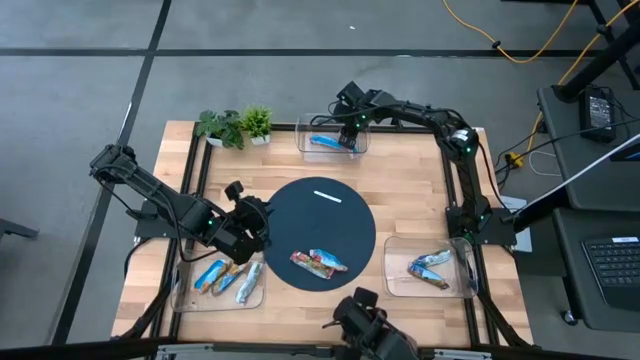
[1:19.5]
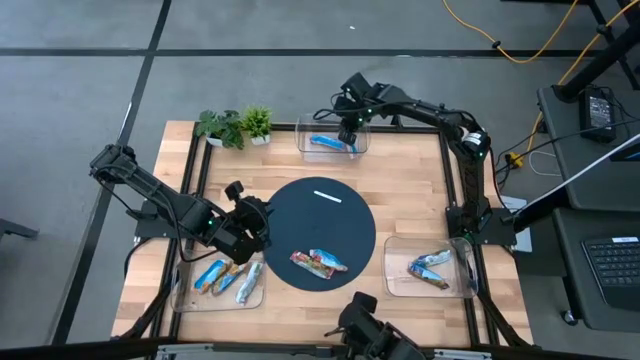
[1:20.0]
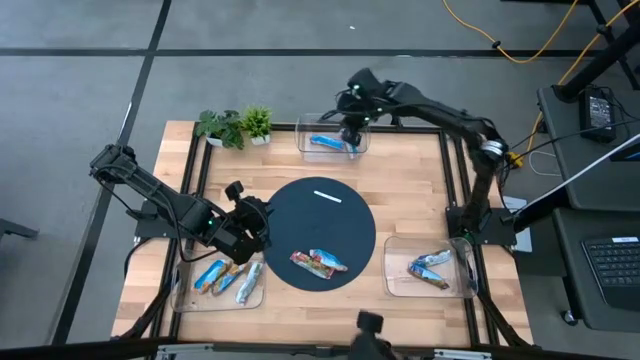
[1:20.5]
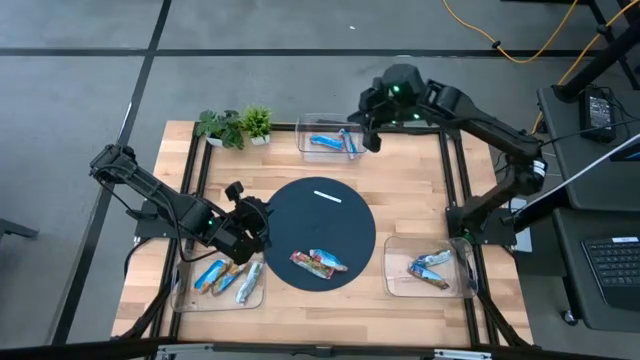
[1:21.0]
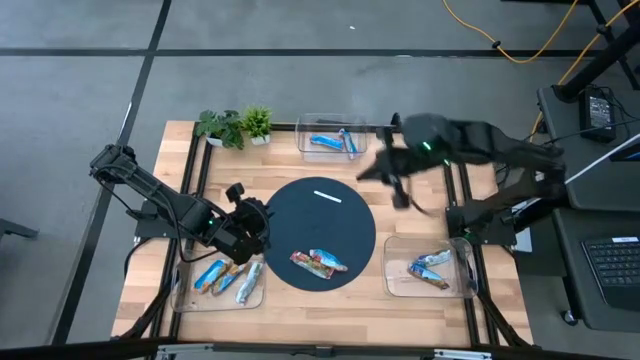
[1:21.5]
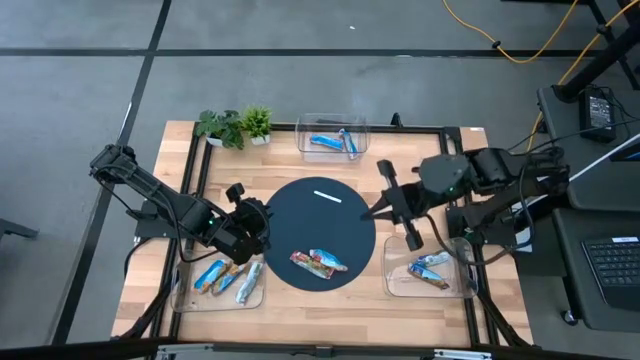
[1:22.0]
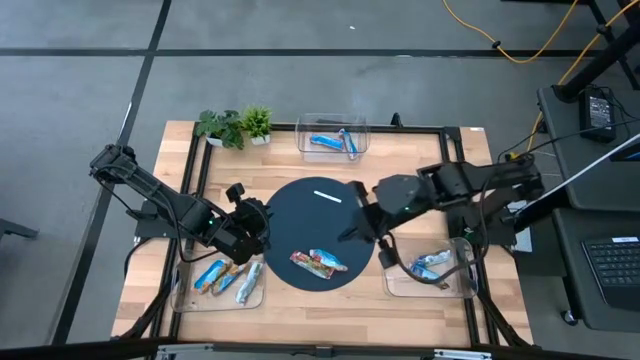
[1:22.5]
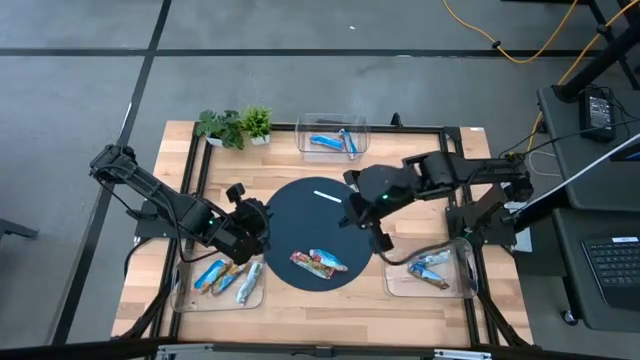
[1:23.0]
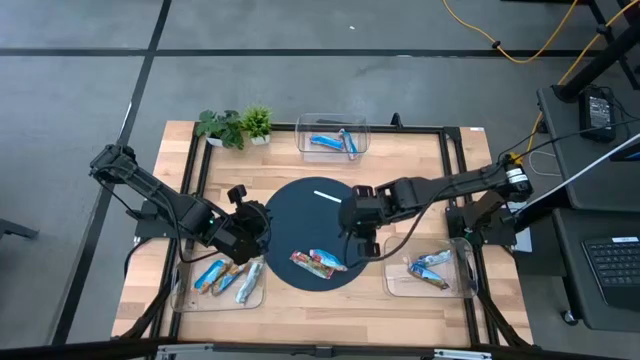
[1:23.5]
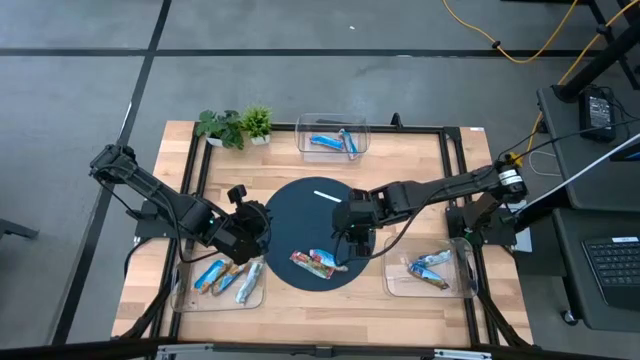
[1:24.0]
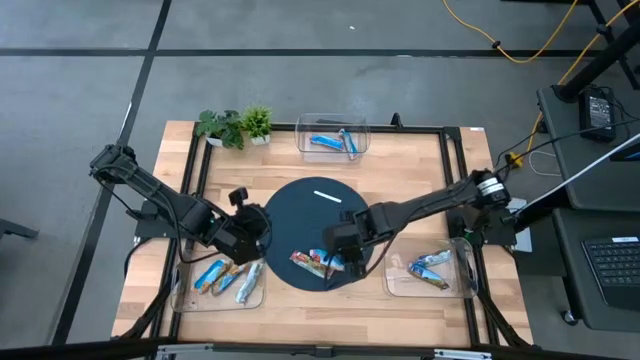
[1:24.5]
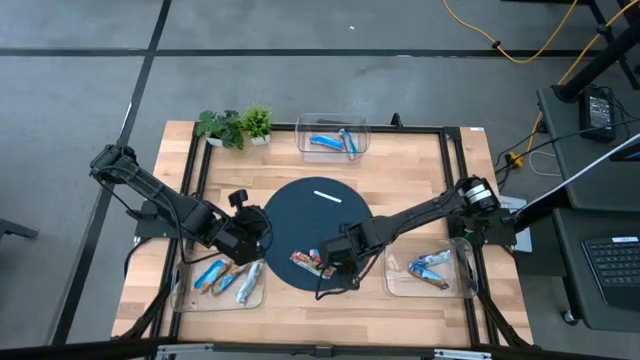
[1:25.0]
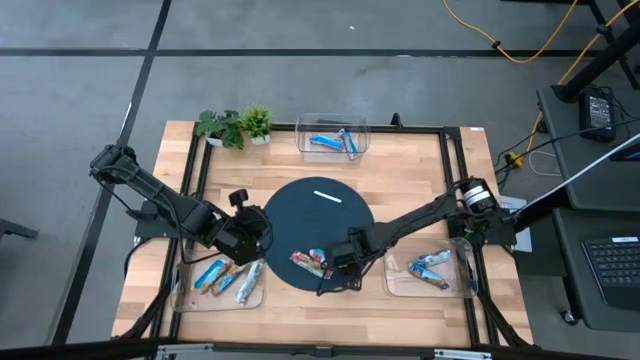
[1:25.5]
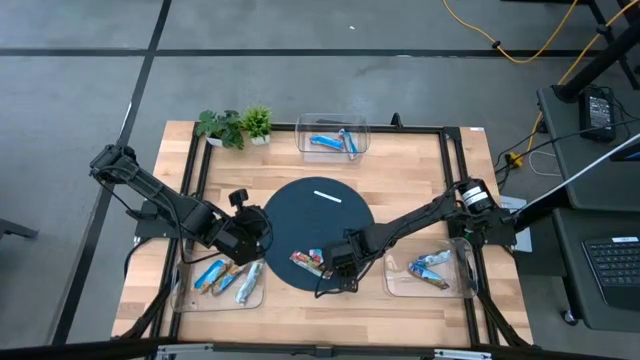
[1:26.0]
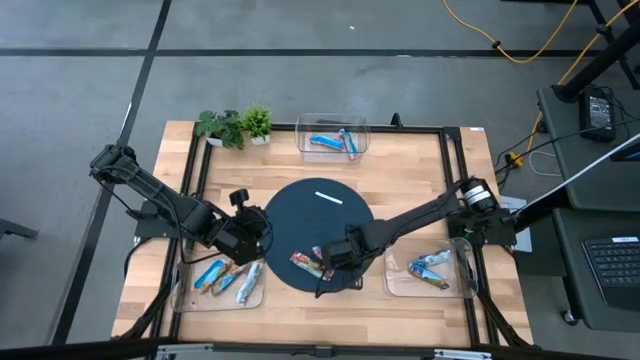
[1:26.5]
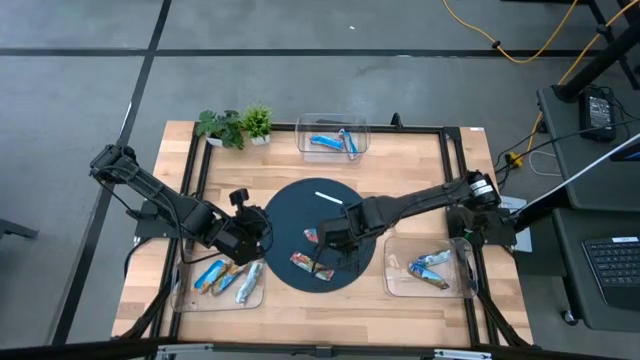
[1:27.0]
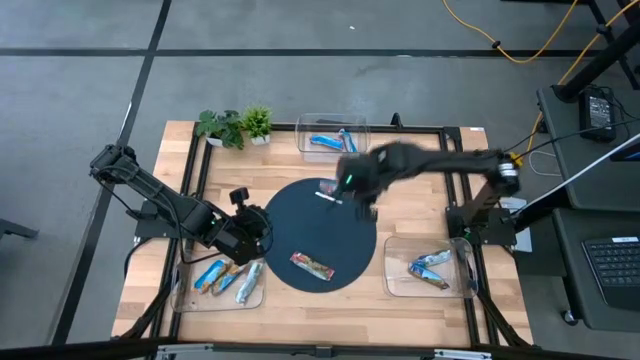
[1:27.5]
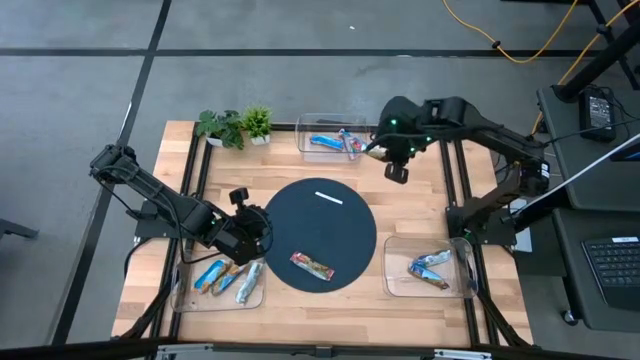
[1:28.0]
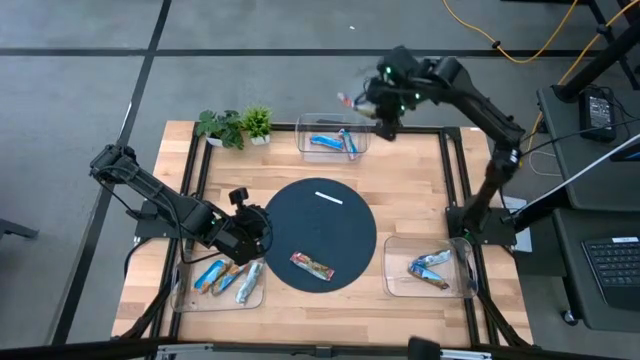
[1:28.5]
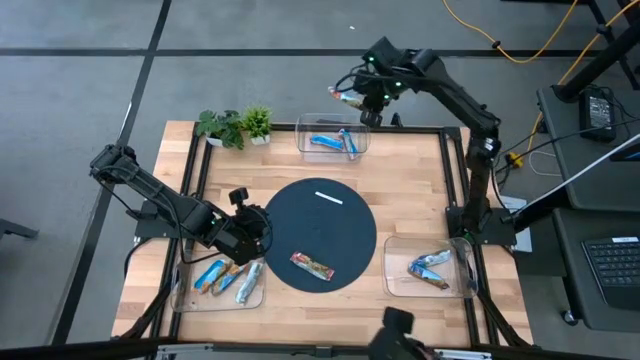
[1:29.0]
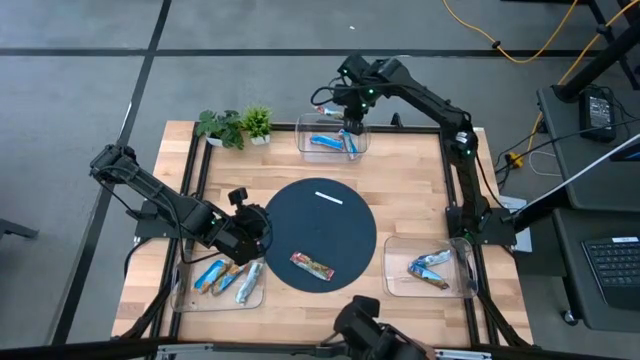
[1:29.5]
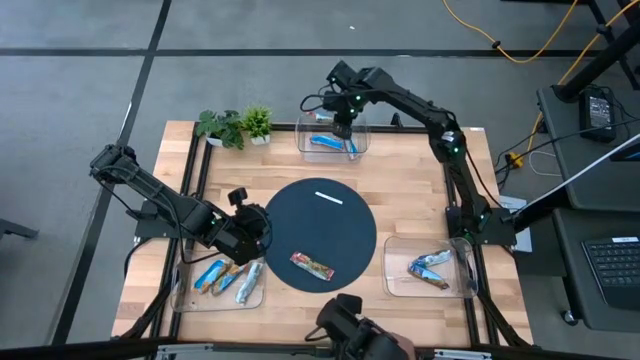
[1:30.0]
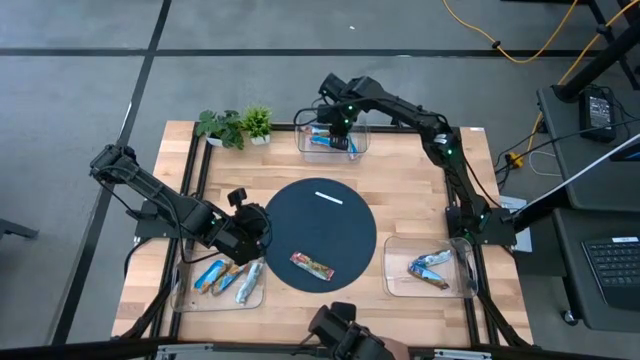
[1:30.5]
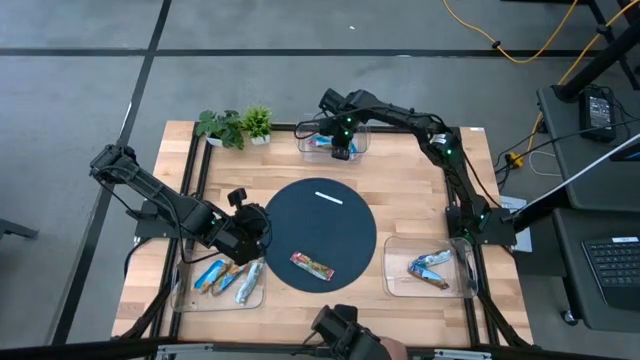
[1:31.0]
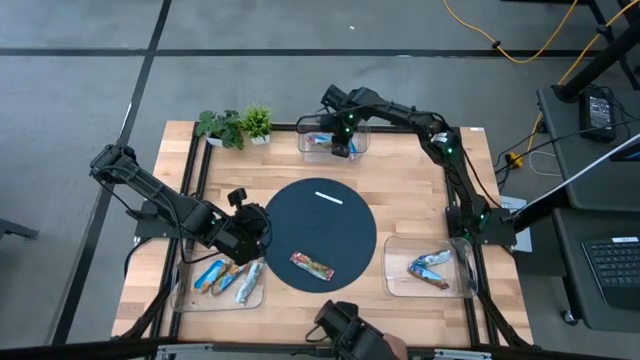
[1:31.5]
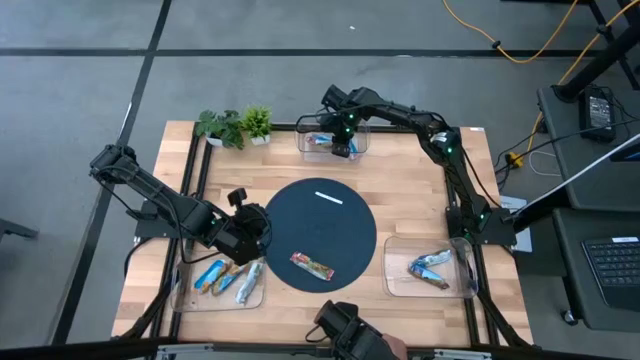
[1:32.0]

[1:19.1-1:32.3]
Task: Pick and place Granola Bars by type
Put the red granola bar into the top transparent bin

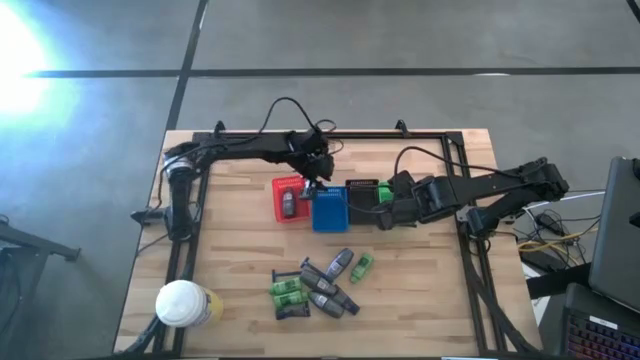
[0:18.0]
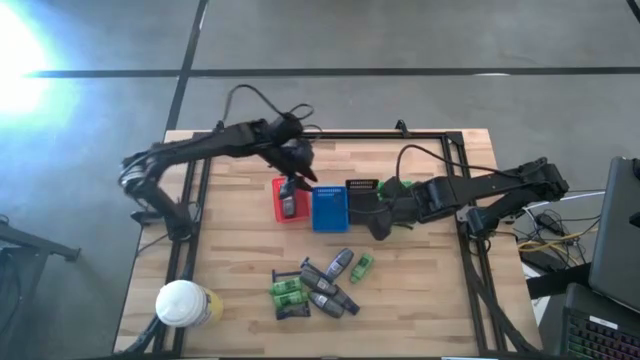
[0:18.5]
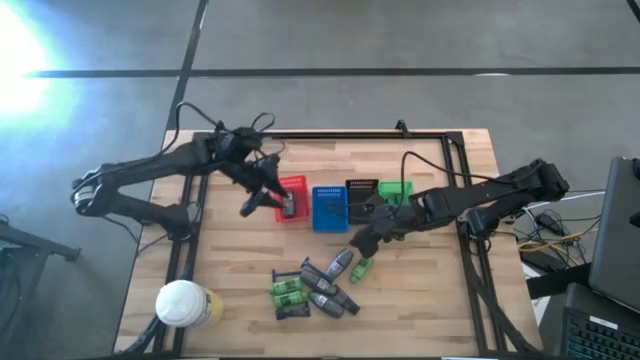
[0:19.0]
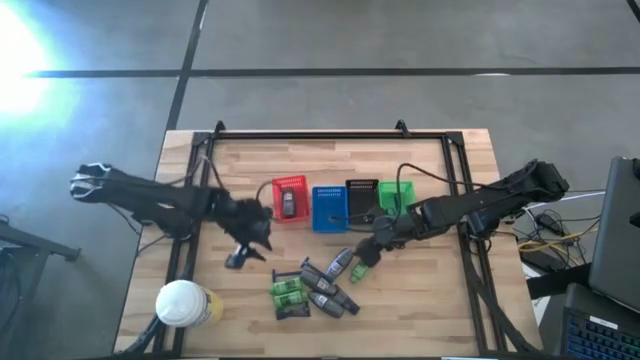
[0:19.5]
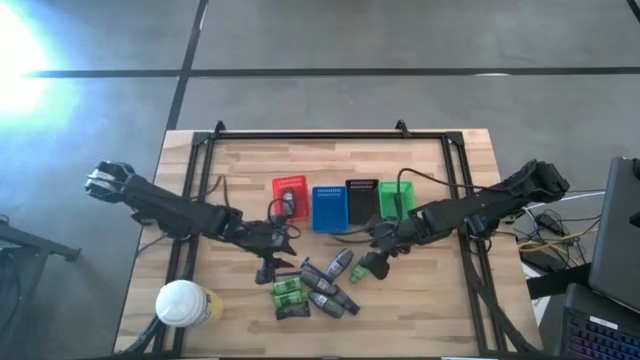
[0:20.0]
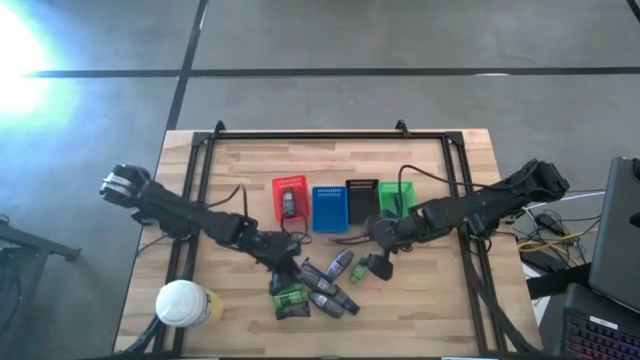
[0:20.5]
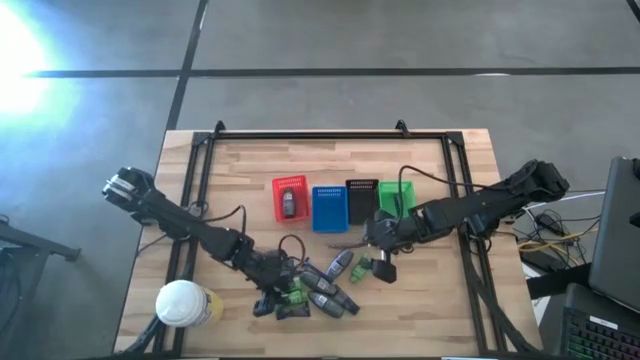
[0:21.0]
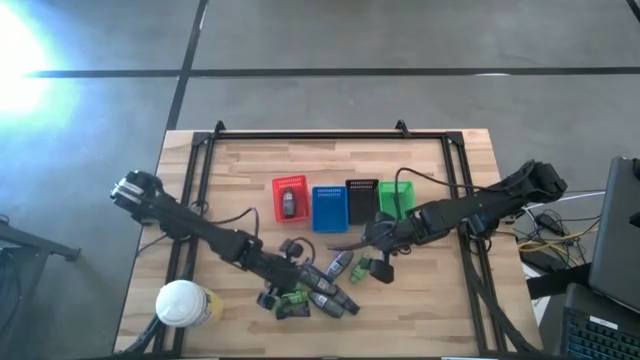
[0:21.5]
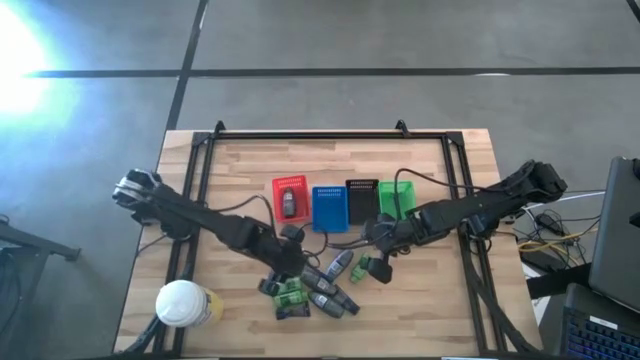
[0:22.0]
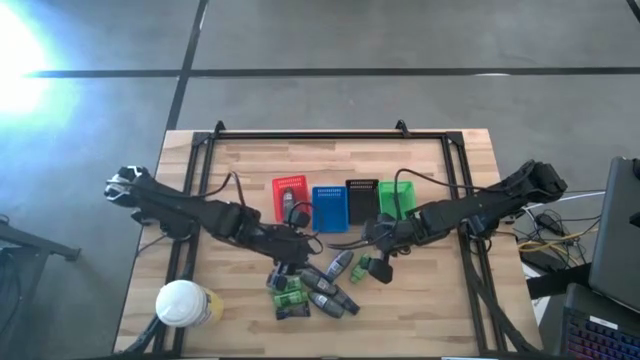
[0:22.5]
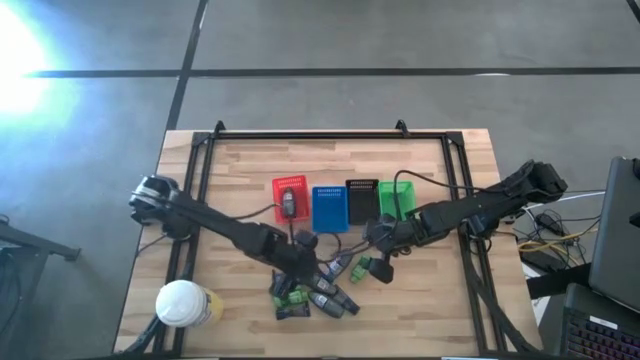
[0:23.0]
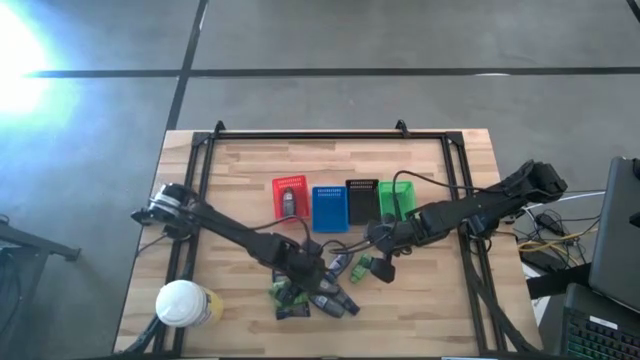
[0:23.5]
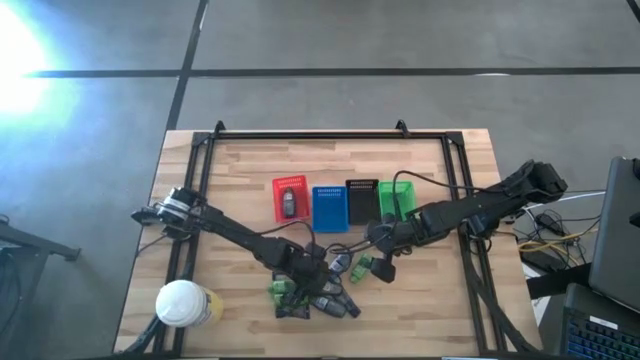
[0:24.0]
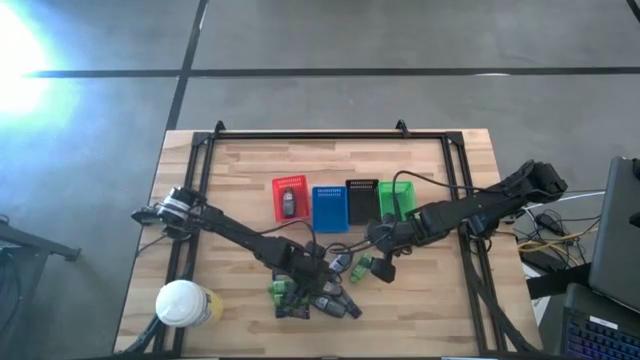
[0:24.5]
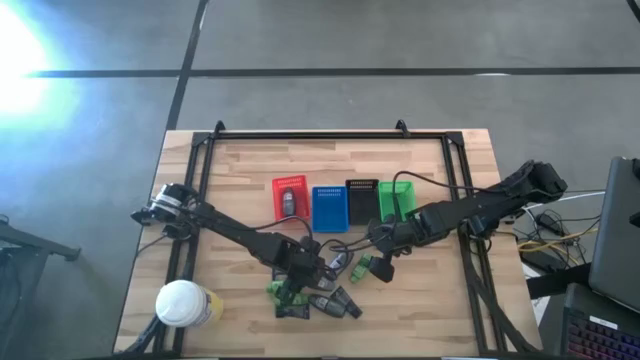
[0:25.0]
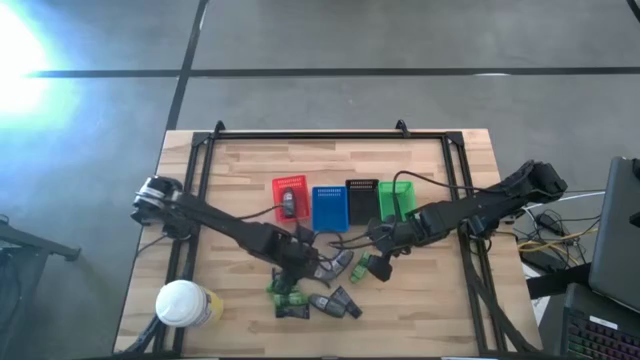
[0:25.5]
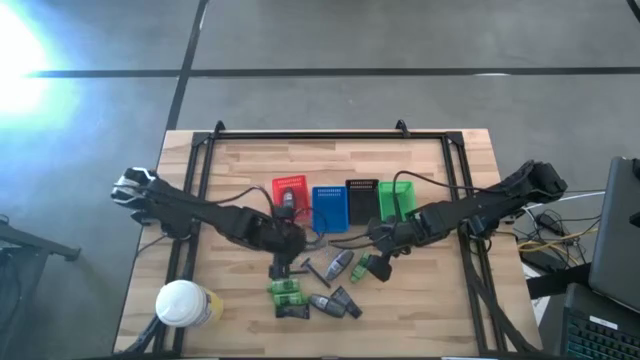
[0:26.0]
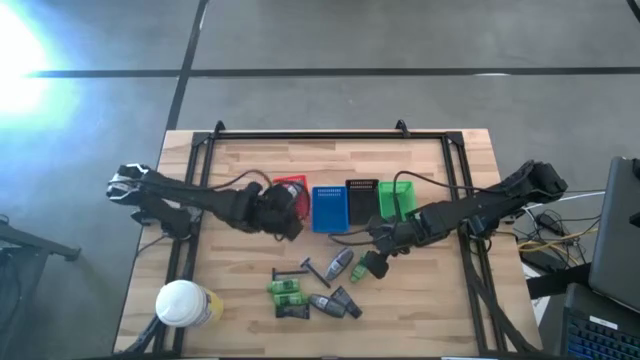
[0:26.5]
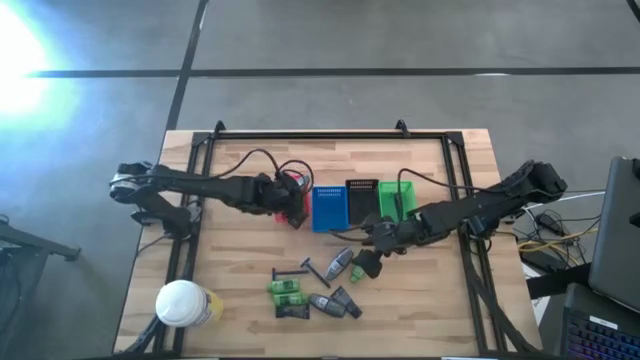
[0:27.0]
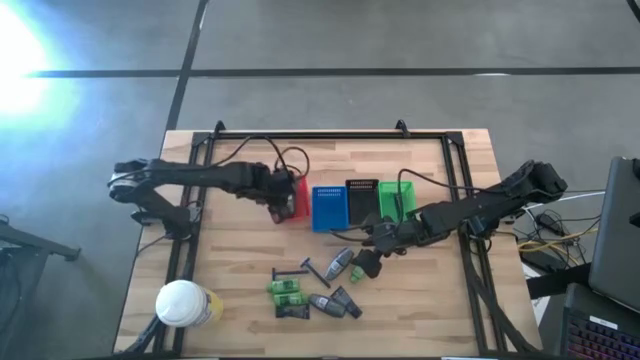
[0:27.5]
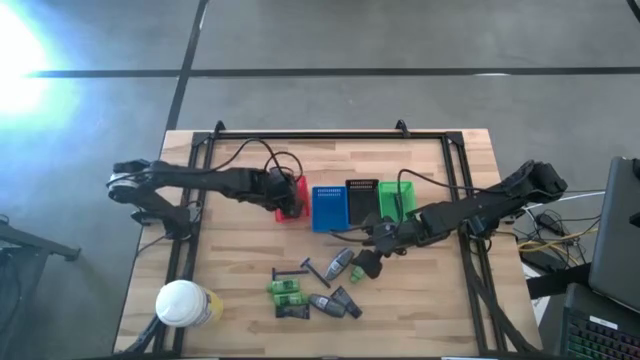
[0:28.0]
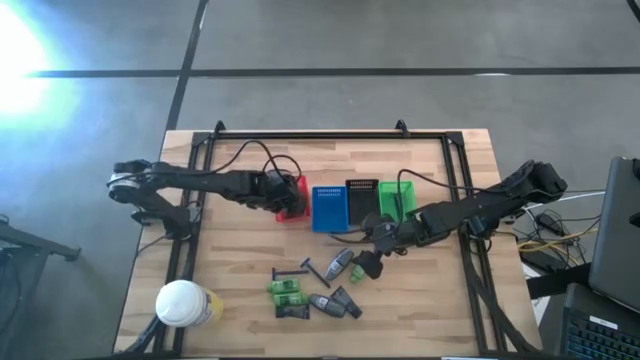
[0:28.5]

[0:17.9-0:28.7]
Task: Pick & Place Travel size toiletries
Put the gray deodorant into the red bin
